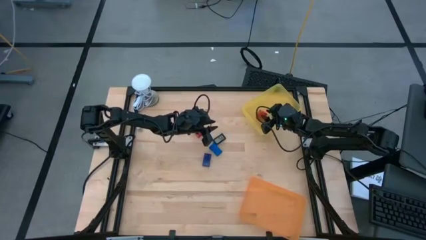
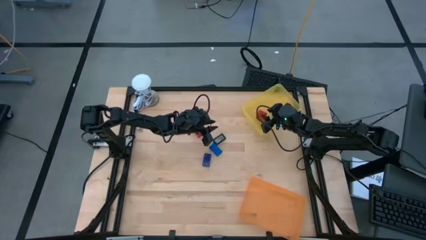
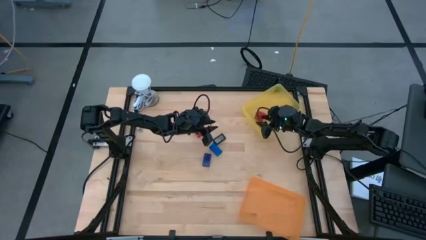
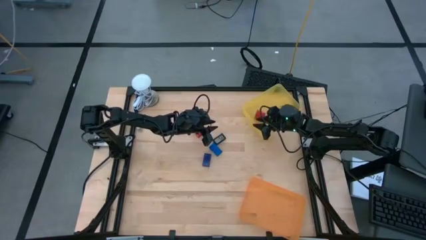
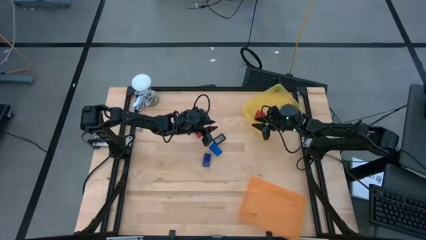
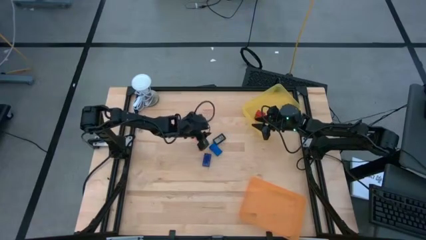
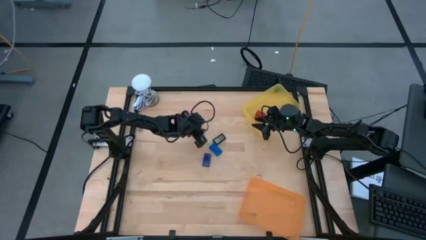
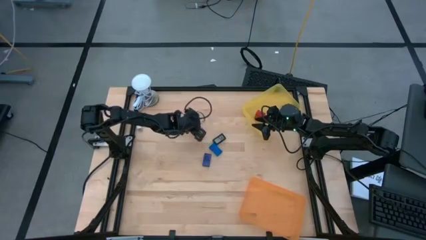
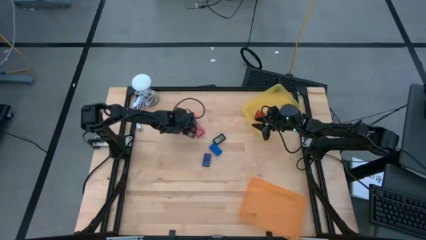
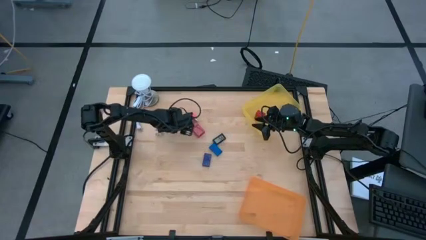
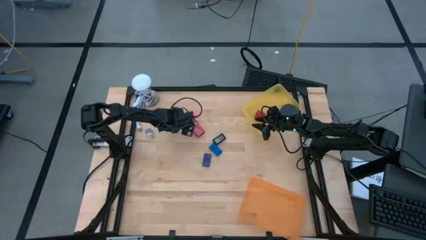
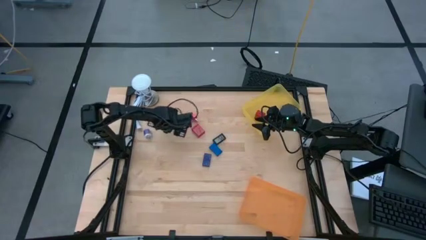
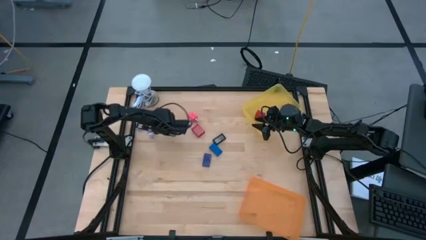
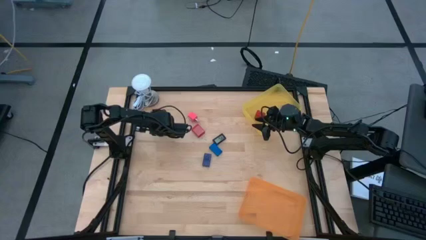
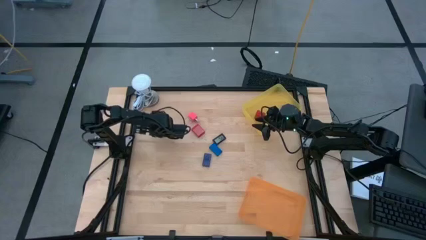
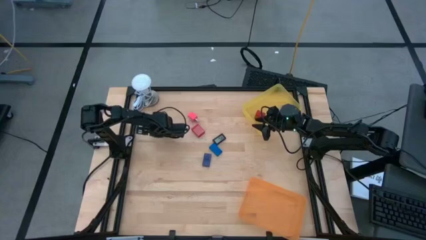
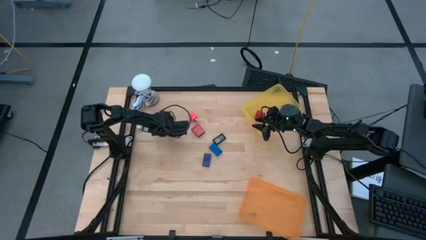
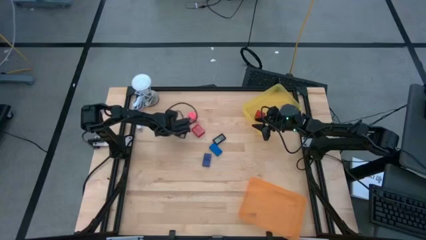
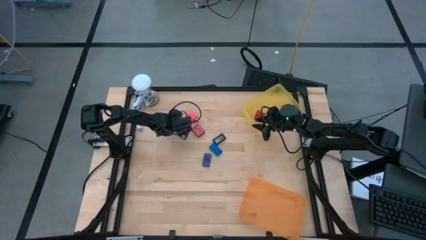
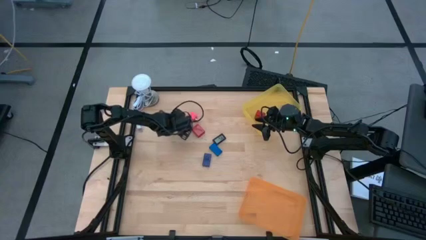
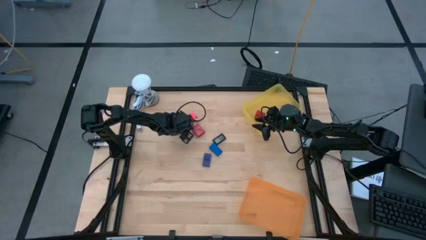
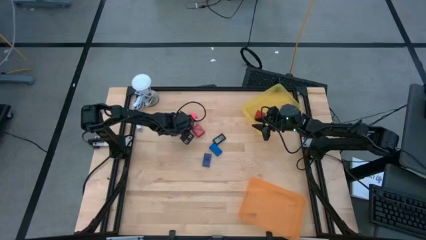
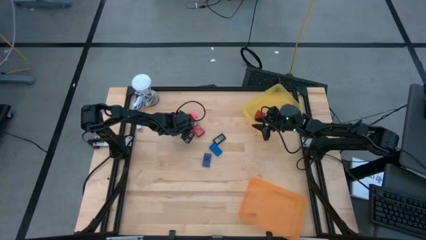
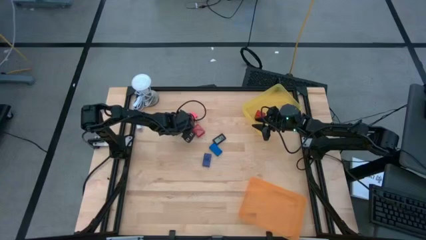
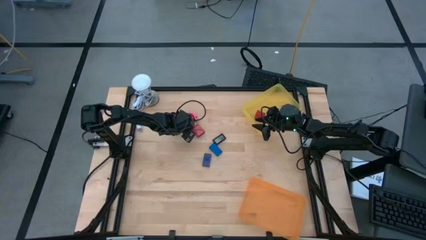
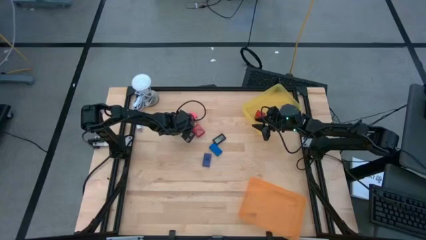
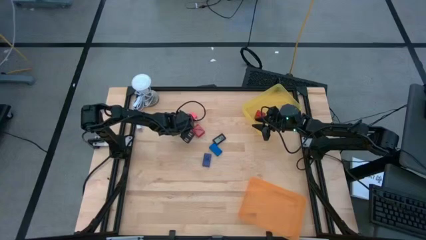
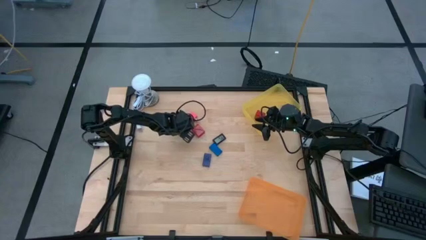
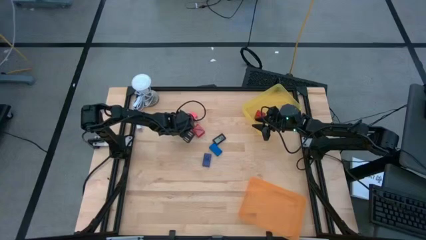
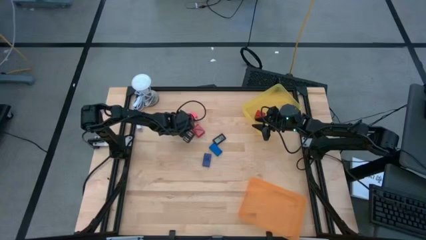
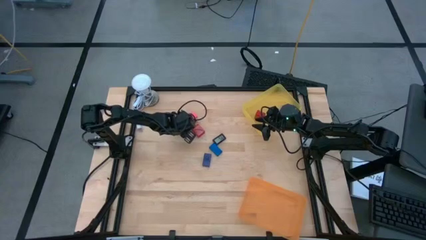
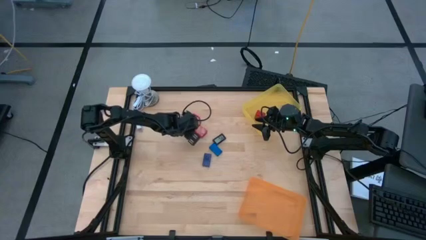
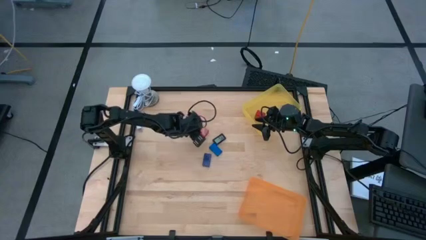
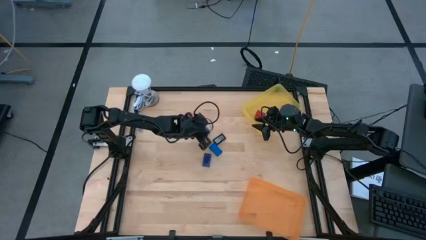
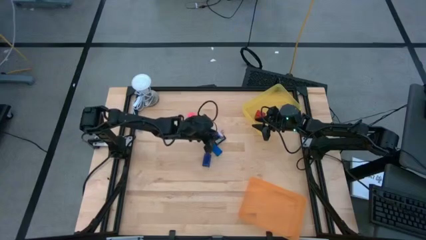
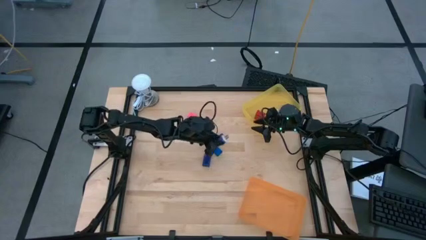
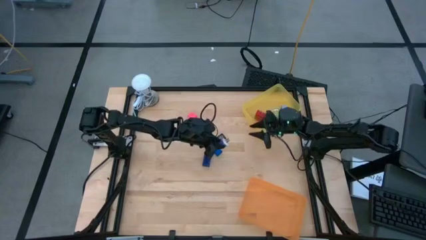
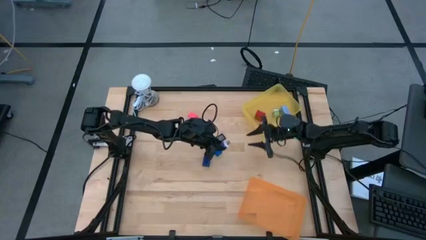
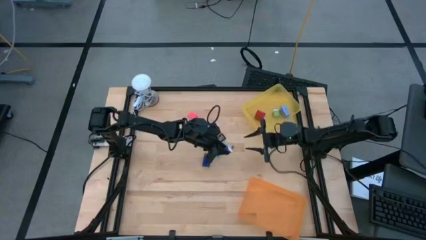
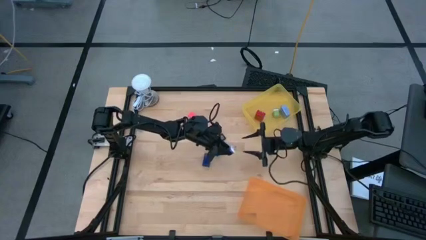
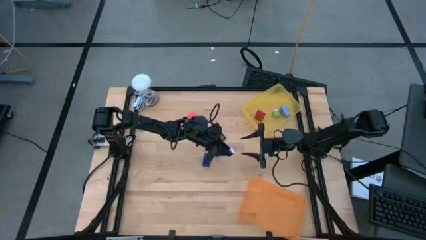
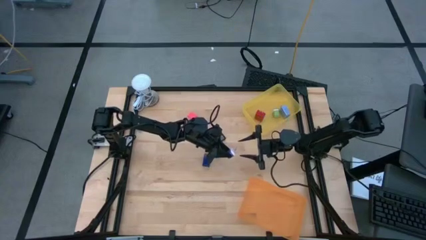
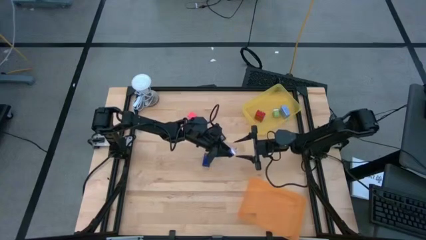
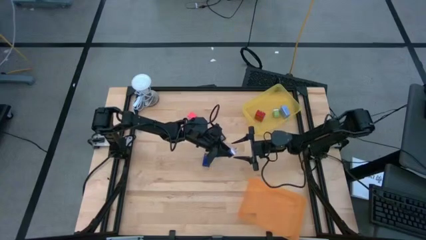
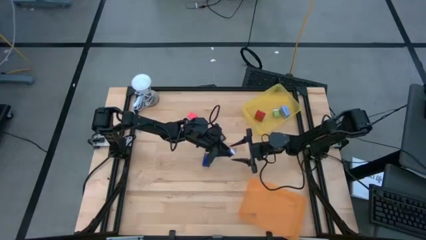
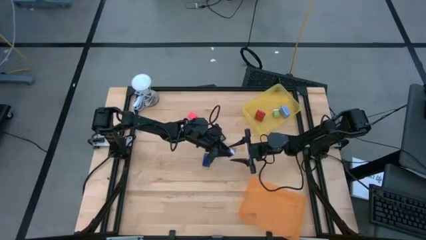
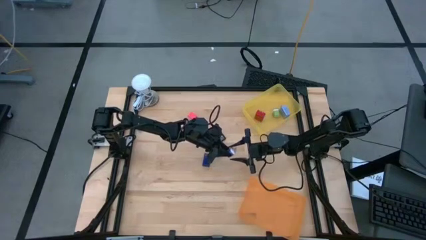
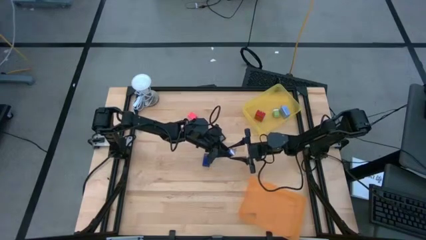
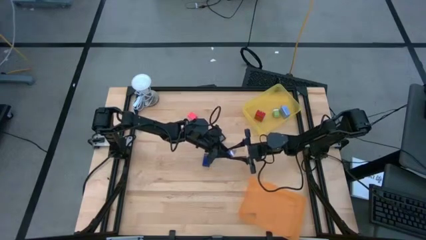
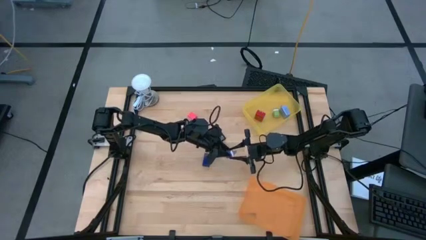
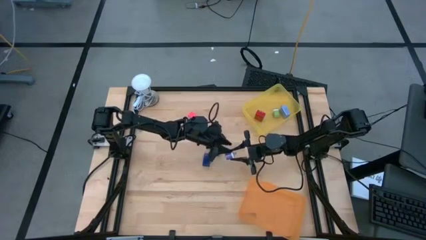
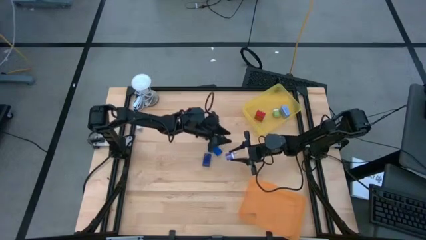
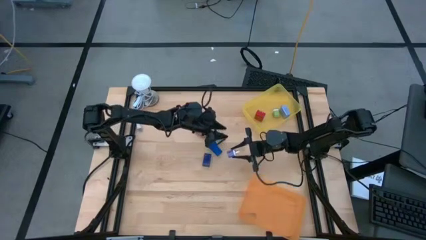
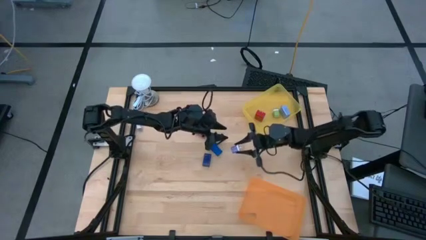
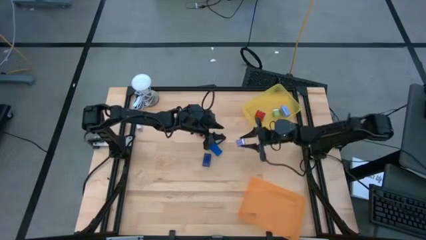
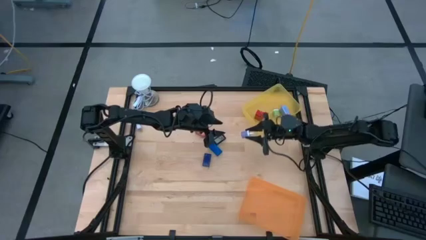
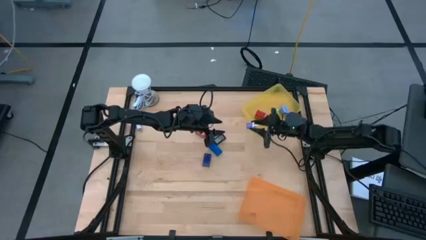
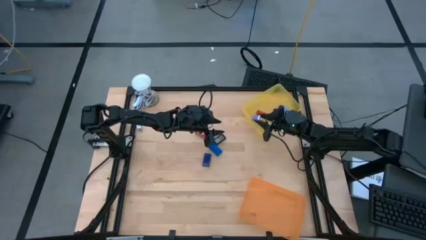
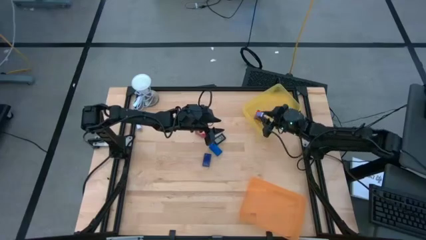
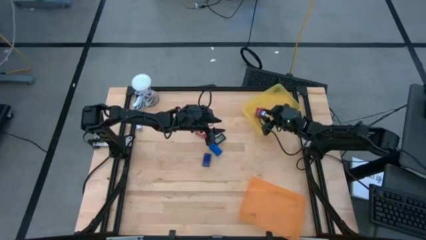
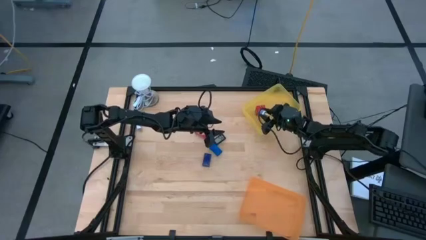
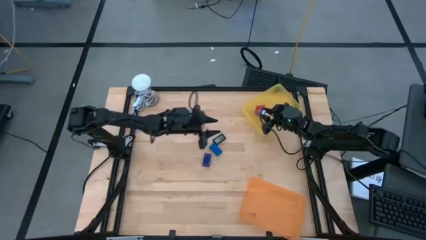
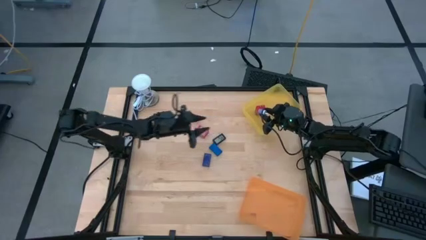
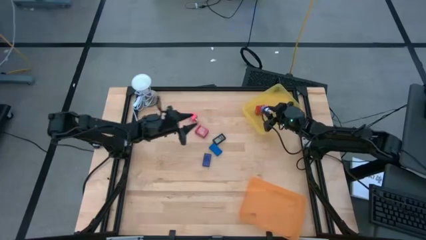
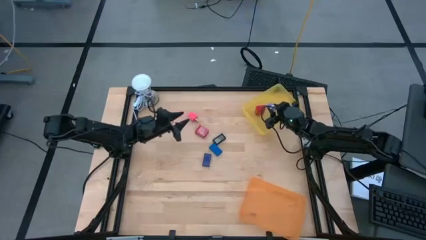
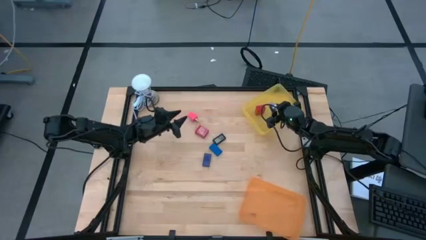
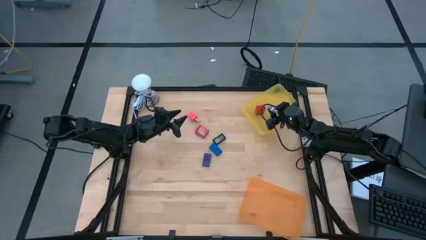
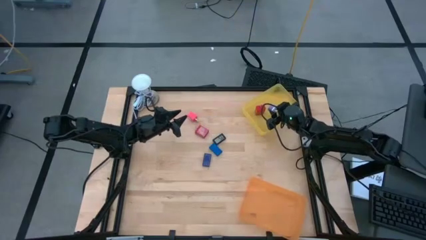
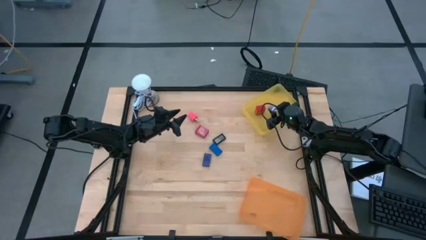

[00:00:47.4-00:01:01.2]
Task: Pick & Place Office items
Put the purple charger adapter into the yellow bin
